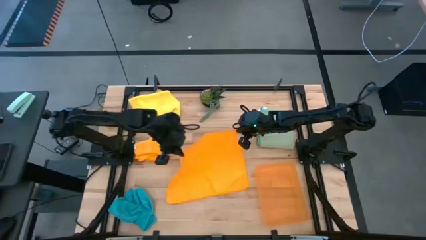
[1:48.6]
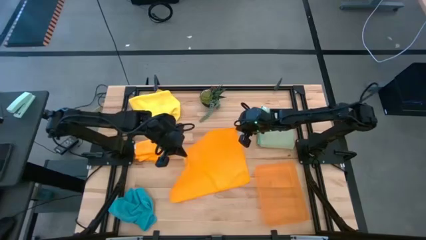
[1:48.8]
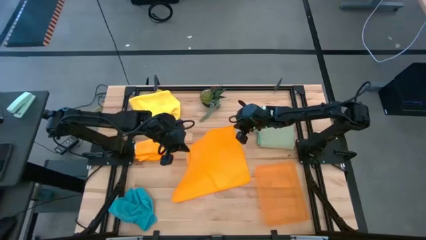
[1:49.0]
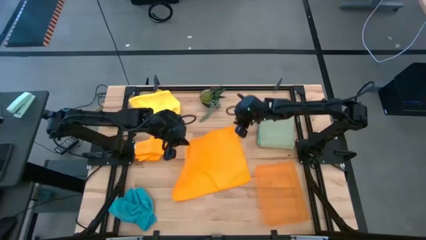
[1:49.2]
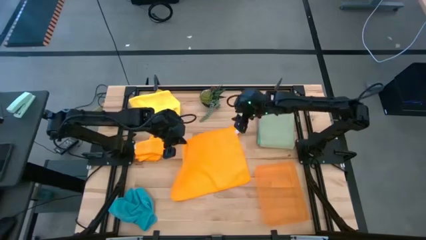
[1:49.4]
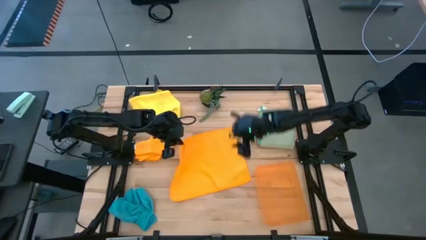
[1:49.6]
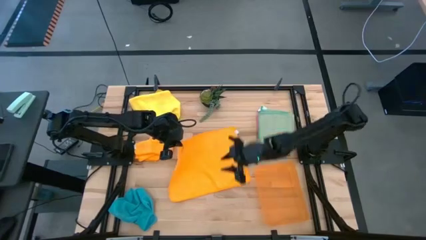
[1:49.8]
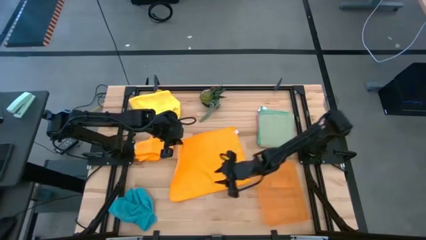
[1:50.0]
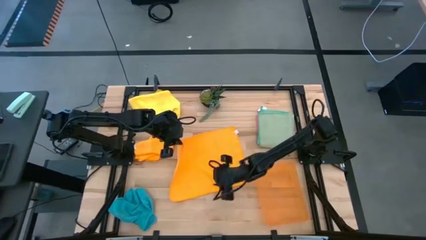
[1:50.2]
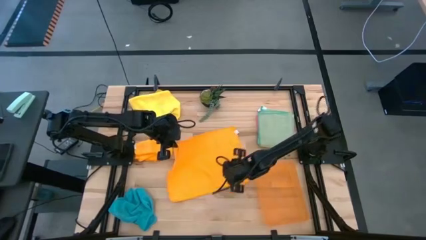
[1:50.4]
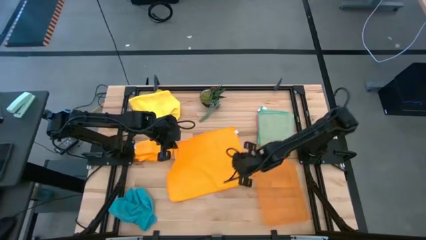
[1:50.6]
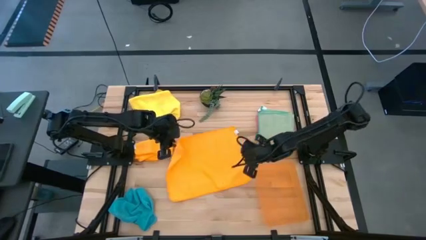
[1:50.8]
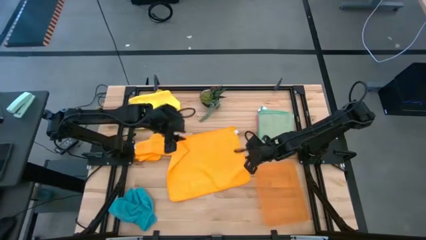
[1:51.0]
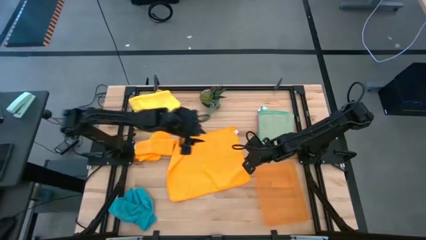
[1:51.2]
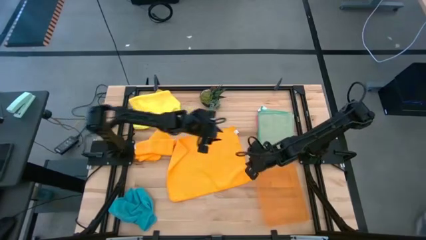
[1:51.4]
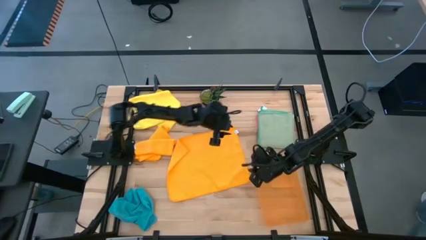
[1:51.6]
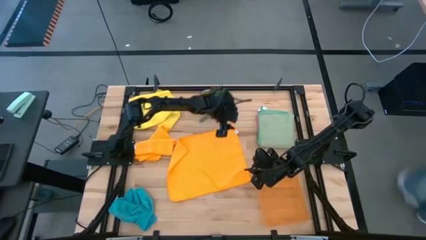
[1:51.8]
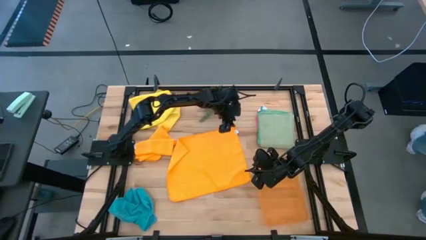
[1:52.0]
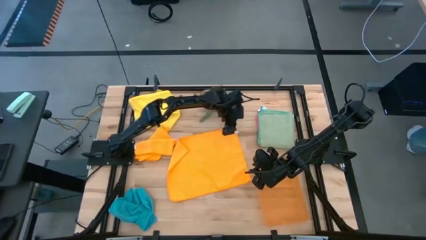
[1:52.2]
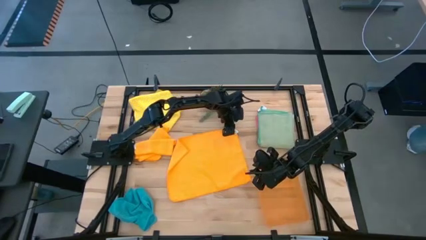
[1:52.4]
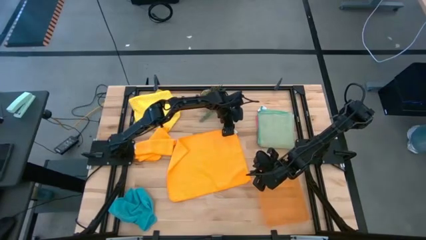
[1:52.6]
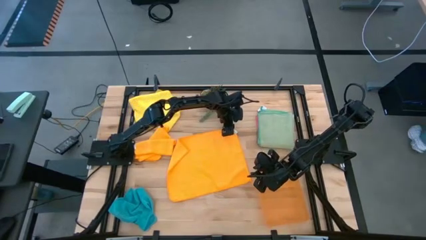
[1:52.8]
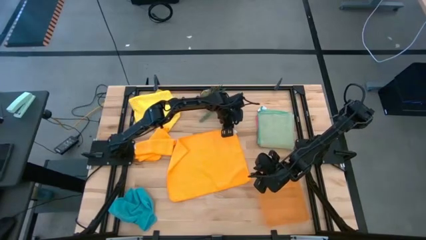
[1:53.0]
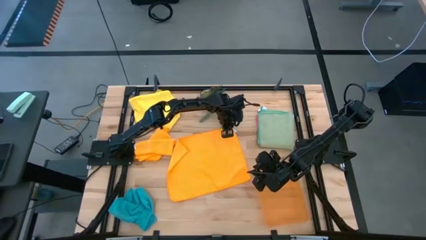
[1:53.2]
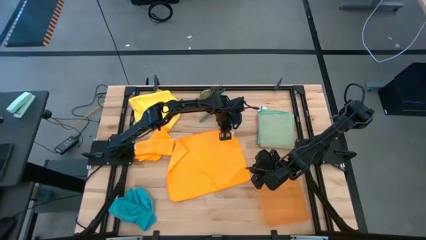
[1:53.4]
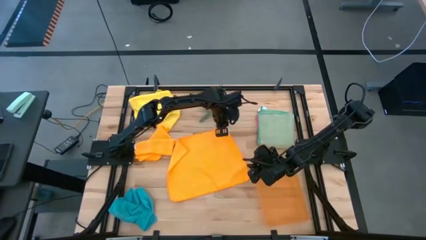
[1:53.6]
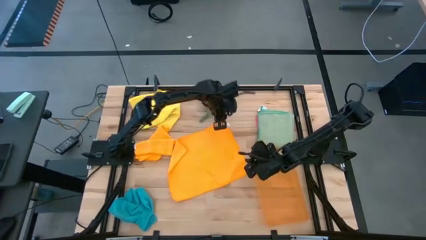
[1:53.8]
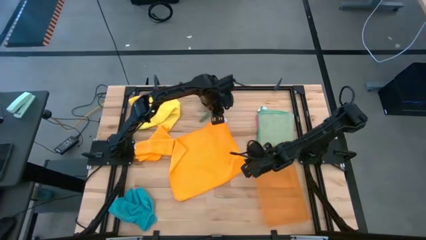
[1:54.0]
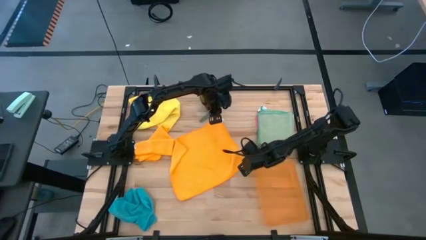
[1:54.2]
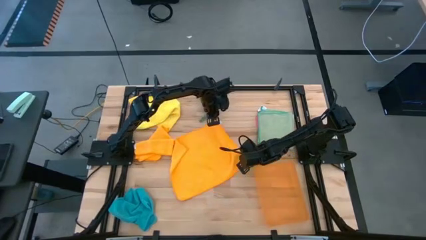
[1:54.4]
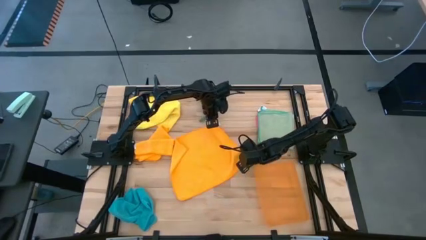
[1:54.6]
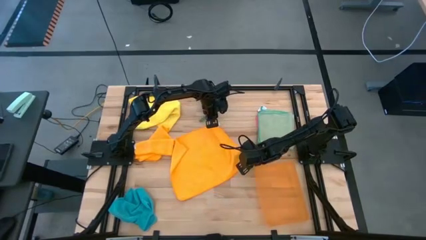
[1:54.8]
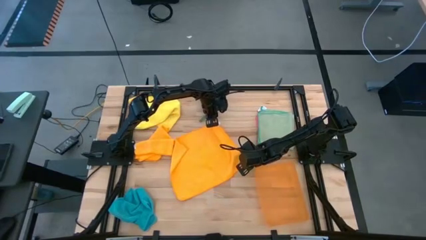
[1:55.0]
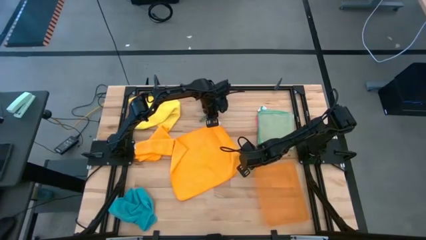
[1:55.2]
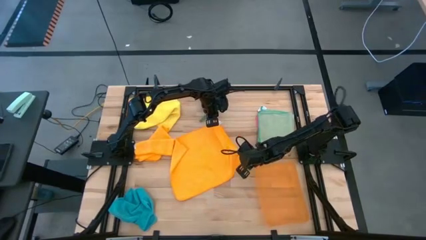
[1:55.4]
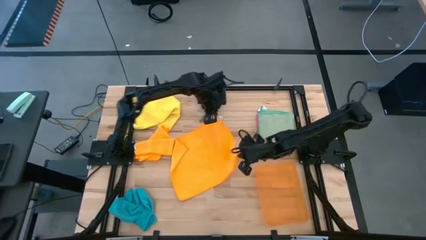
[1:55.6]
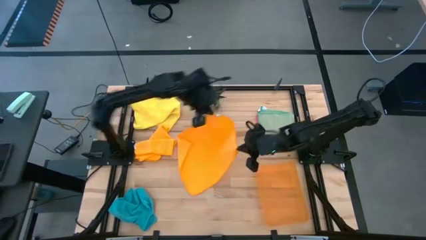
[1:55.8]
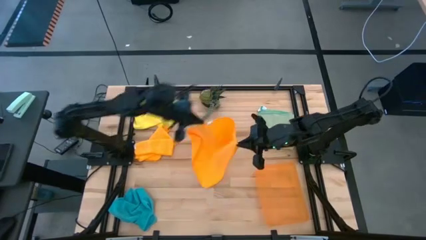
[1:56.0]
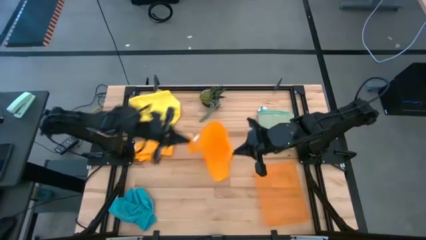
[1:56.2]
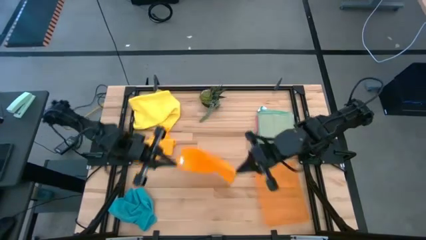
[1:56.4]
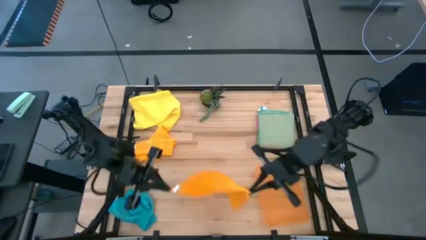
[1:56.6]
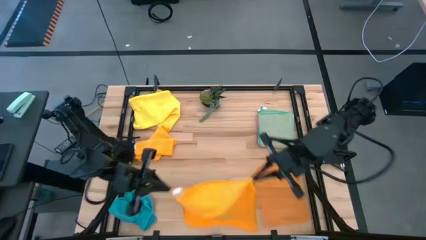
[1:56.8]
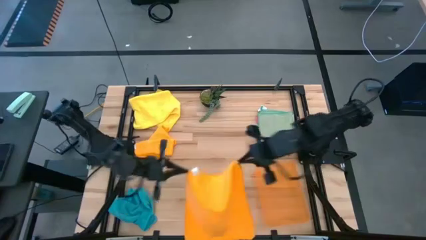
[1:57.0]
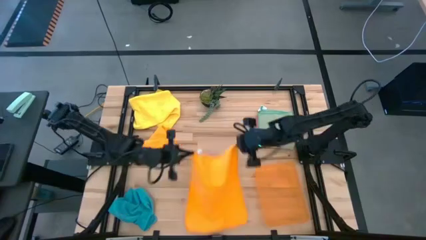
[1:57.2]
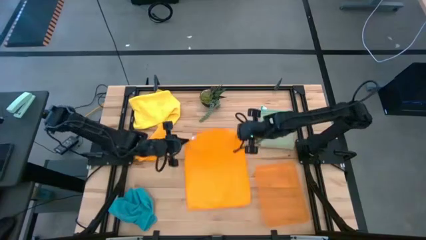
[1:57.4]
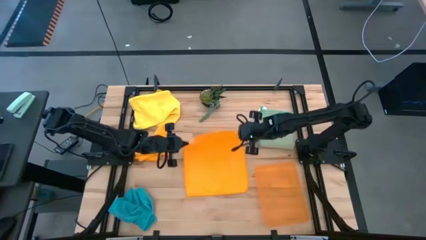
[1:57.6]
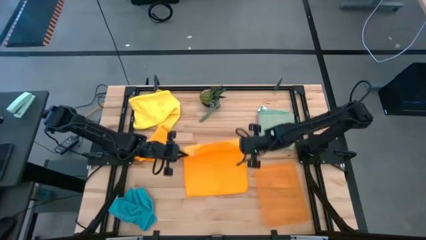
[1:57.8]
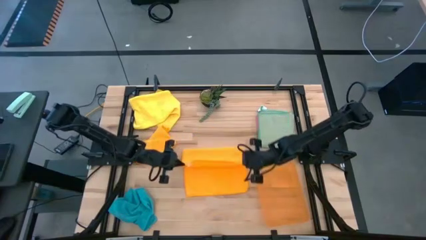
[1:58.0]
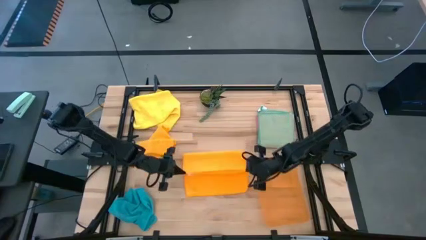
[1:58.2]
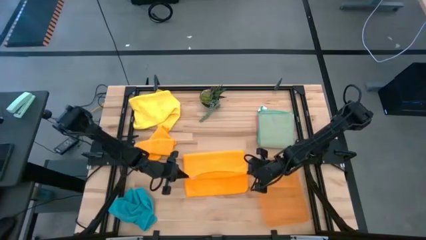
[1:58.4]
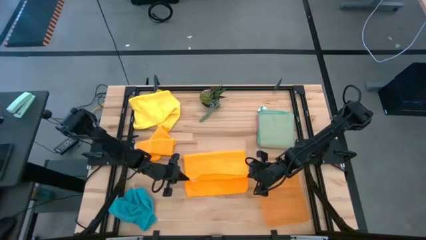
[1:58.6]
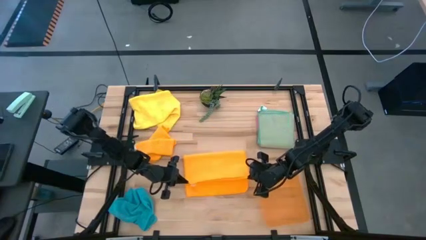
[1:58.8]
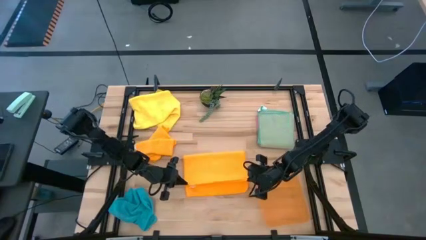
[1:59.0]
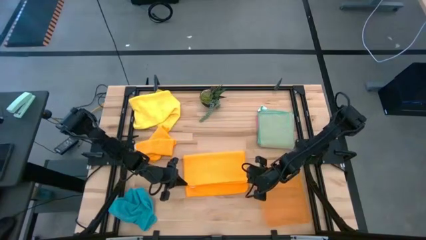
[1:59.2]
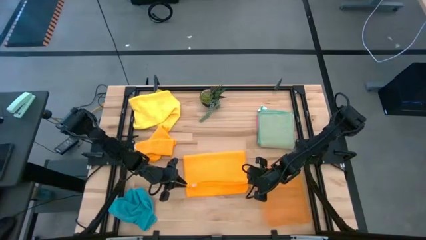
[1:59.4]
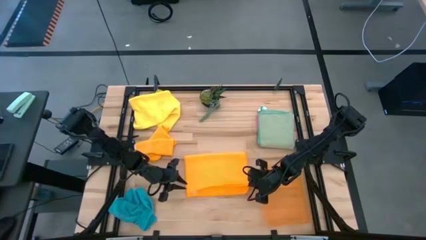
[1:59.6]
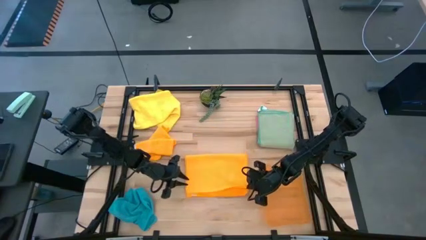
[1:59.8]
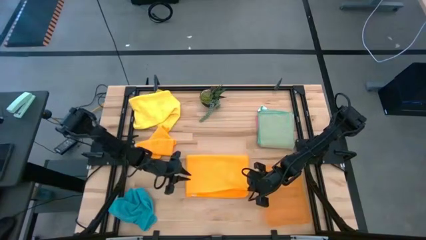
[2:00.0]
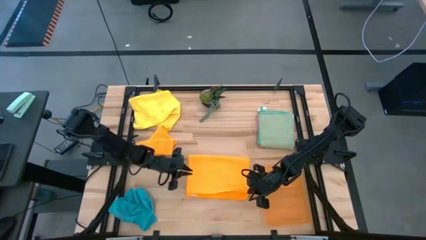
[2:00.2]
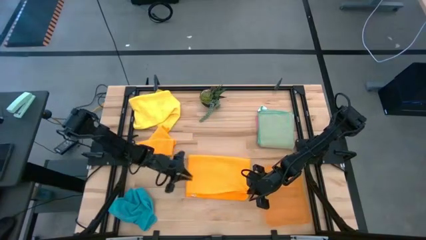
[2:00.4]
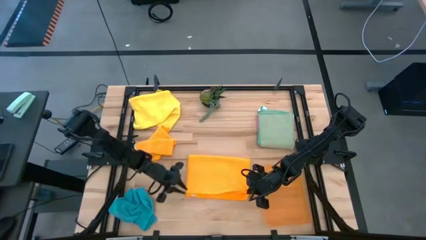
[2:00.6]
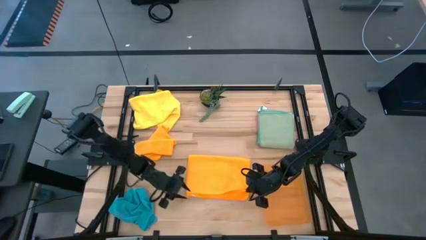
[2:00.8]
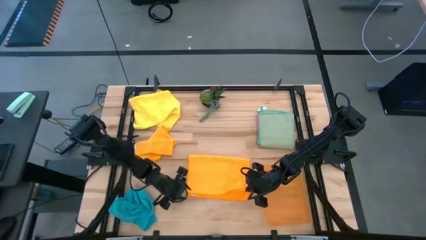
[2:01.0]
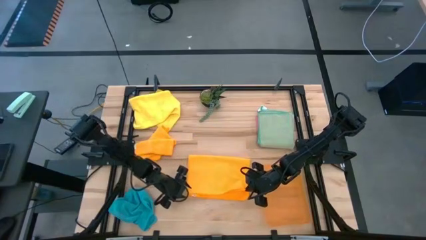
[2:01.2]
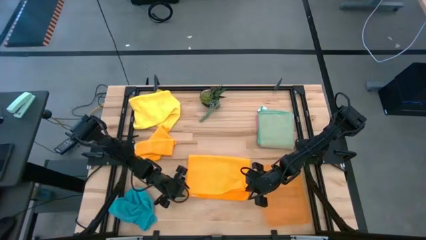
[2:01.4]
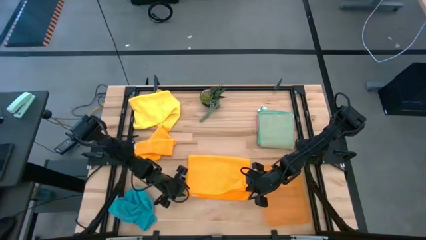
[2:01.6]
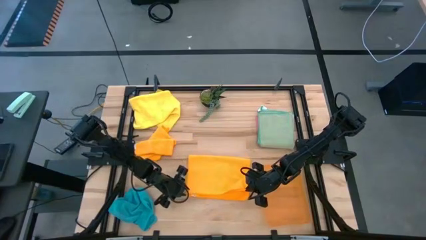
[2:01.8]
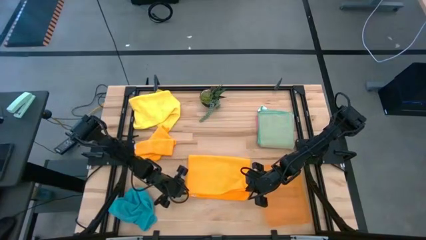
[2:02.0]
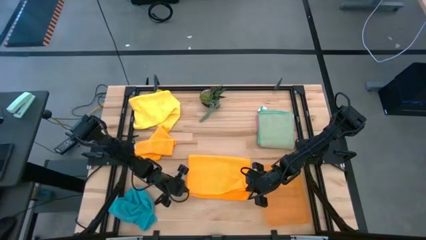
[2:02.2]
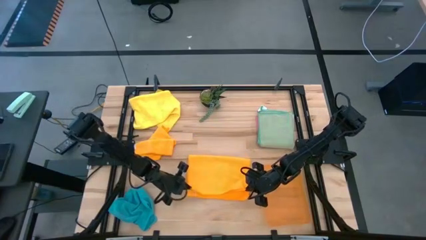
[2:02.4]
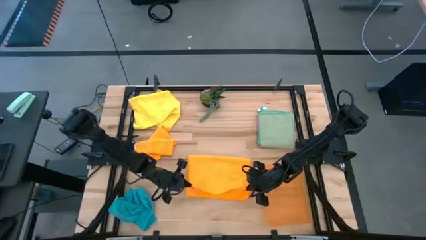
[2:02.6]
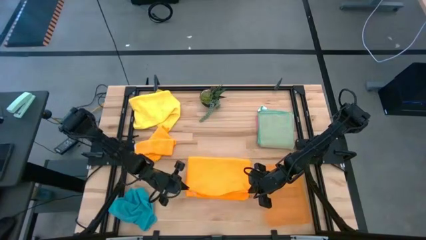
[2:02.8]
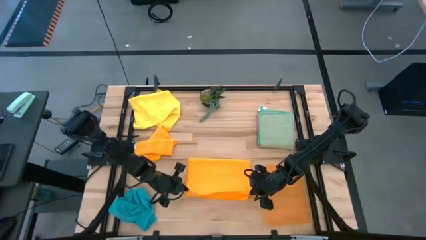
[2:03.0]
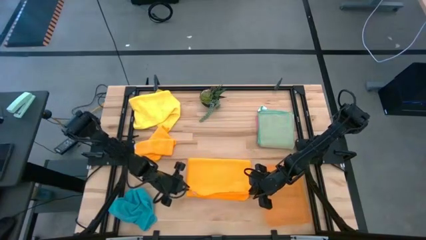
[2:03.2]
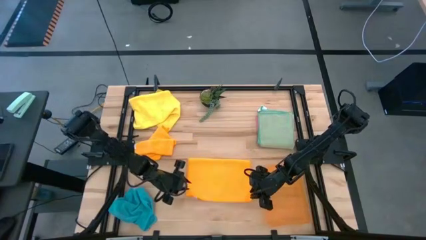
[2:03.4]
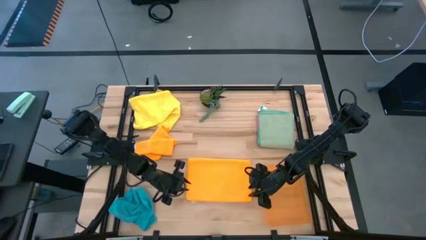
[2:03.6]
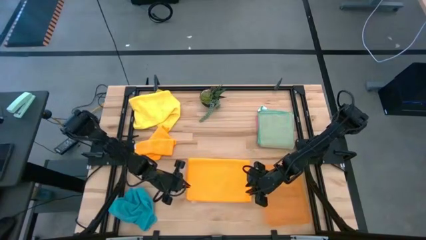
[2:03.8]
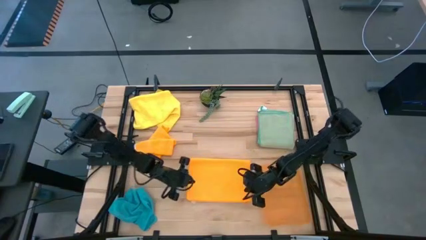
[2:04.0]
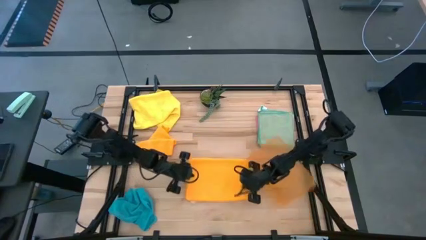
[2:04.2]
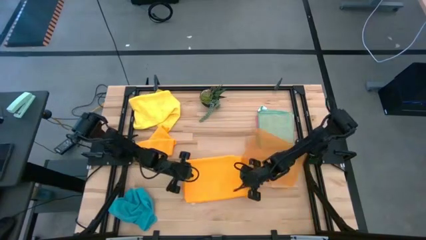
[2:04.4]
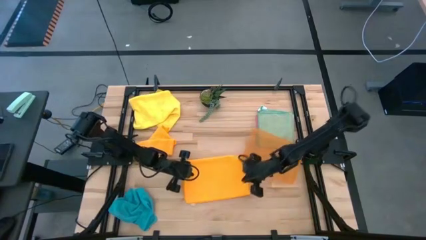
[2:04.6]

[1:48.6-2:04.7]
Task: Fold microfiber towels
Fold the right orange microfiber towel

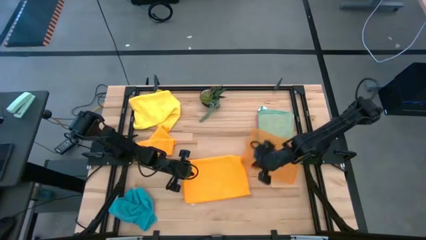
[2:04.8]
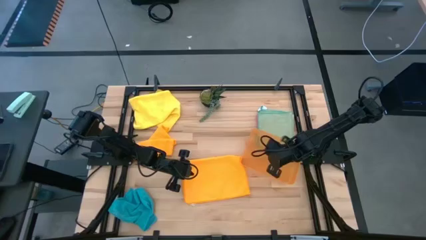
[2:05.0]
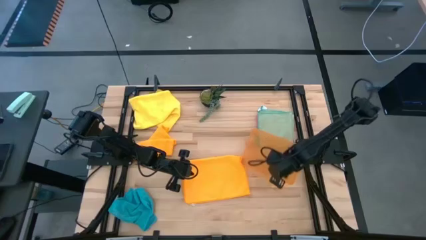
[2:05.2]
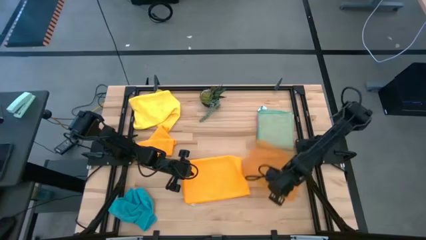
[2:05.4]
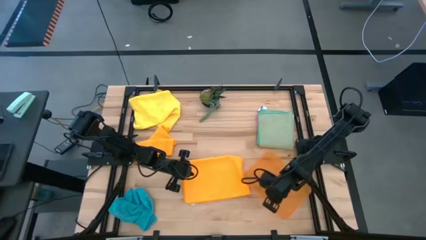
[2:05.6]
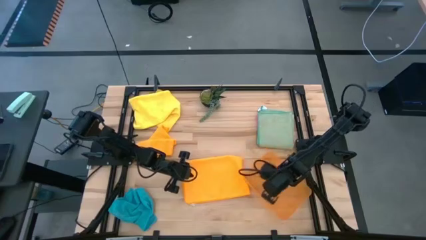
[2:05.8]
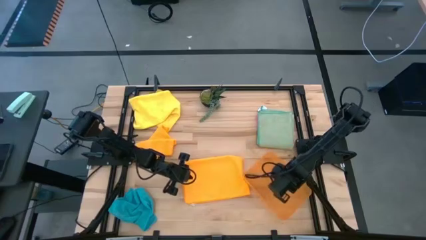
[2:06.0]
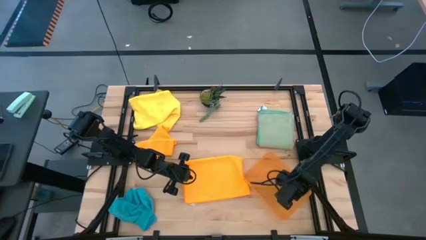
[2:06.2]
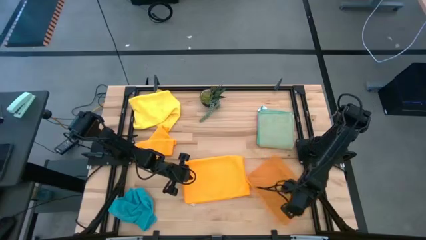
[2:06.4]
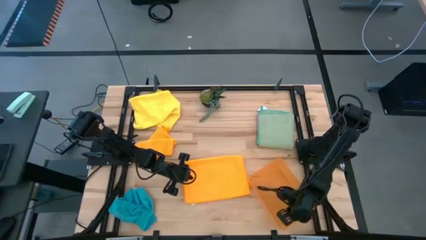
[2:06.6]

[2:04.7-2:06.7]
Adjust the bin
